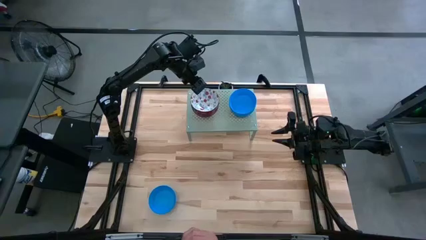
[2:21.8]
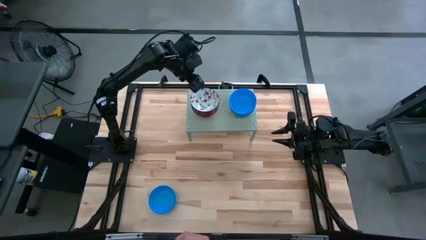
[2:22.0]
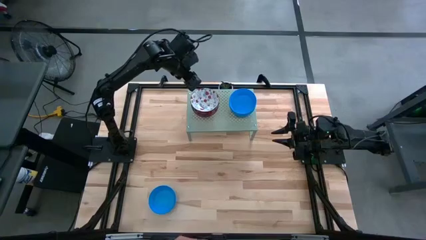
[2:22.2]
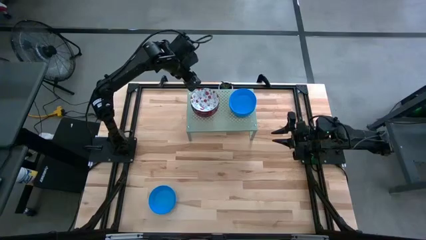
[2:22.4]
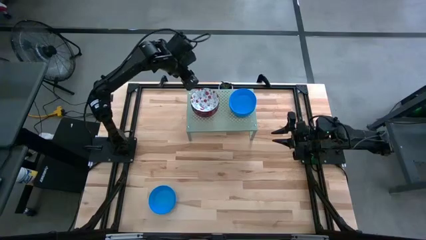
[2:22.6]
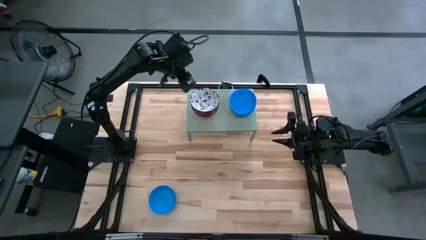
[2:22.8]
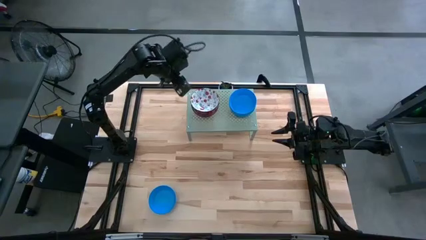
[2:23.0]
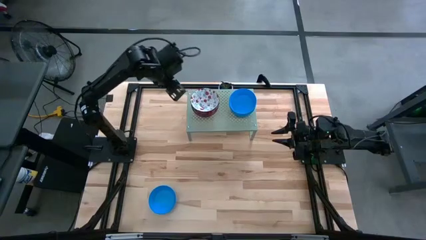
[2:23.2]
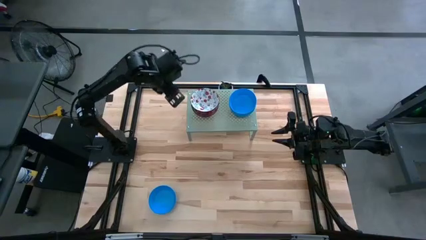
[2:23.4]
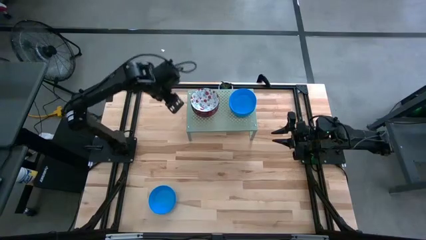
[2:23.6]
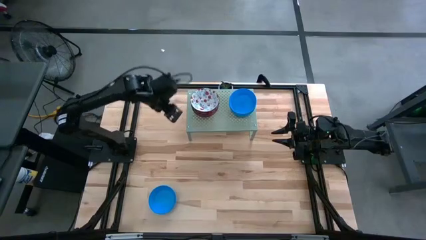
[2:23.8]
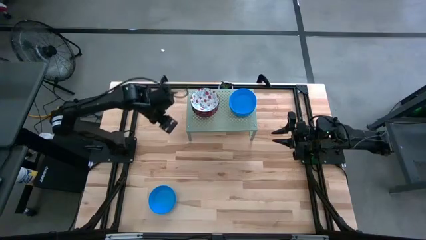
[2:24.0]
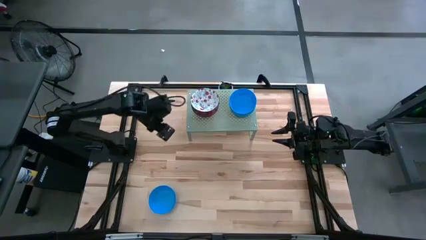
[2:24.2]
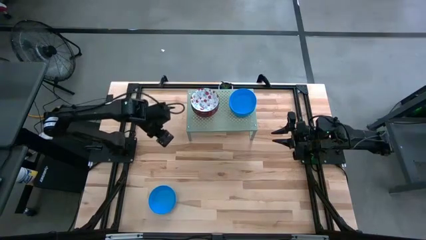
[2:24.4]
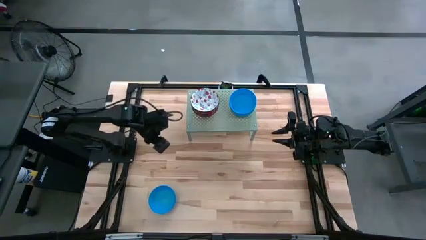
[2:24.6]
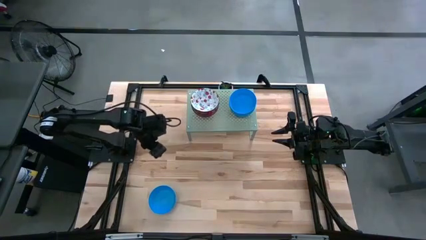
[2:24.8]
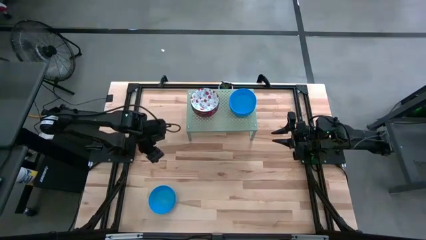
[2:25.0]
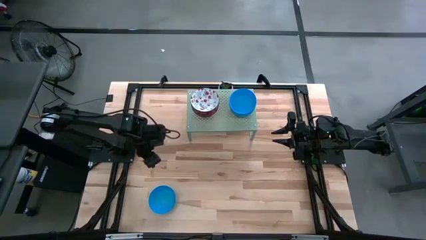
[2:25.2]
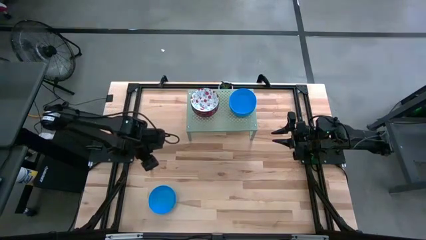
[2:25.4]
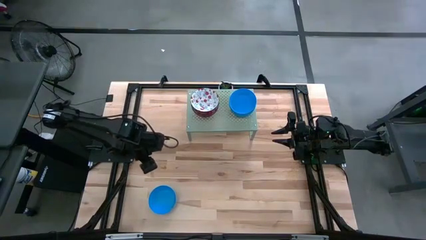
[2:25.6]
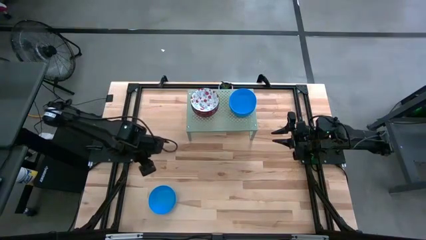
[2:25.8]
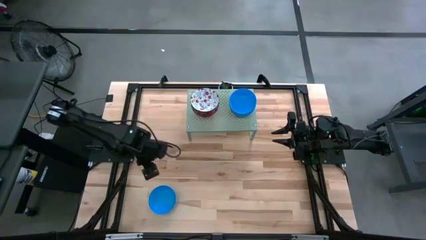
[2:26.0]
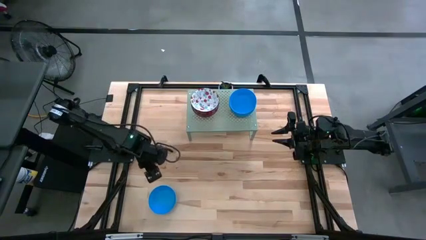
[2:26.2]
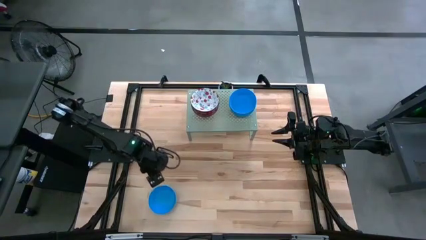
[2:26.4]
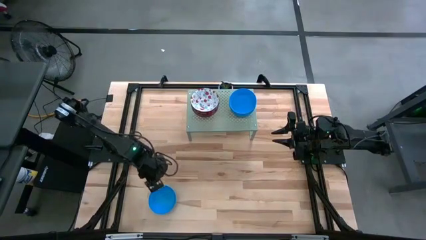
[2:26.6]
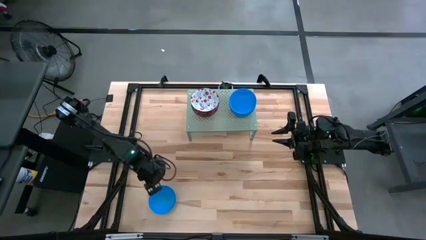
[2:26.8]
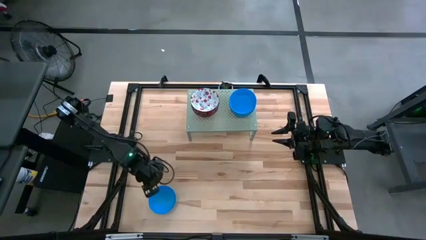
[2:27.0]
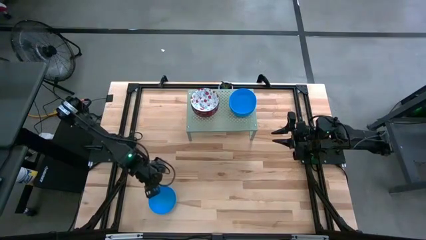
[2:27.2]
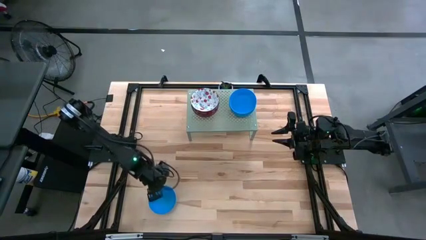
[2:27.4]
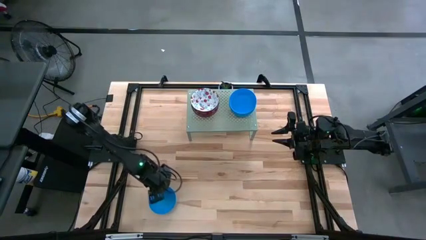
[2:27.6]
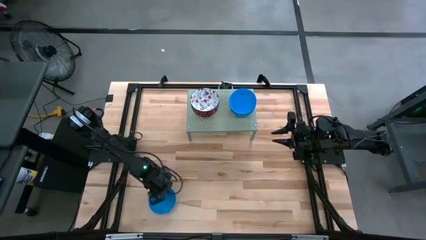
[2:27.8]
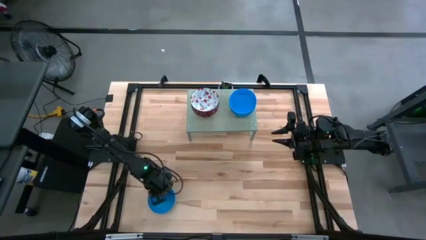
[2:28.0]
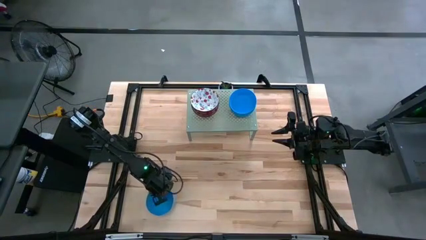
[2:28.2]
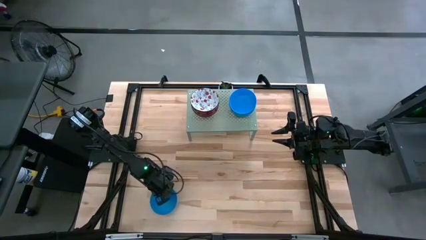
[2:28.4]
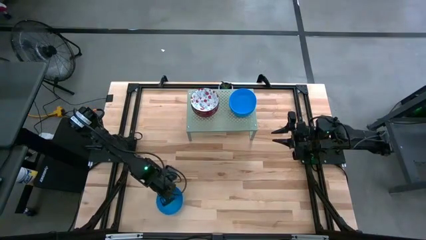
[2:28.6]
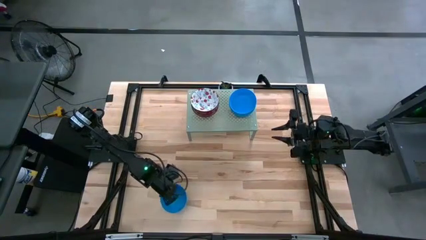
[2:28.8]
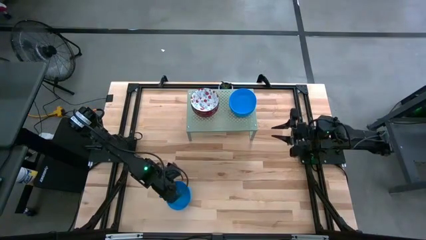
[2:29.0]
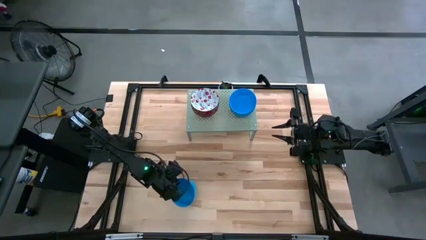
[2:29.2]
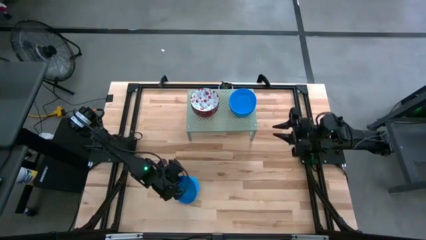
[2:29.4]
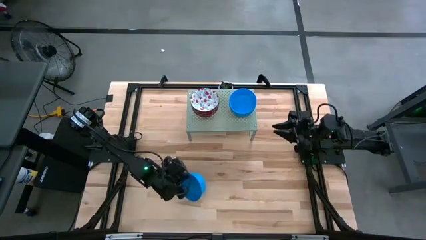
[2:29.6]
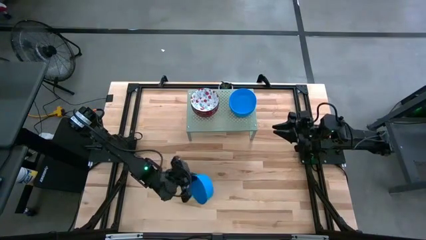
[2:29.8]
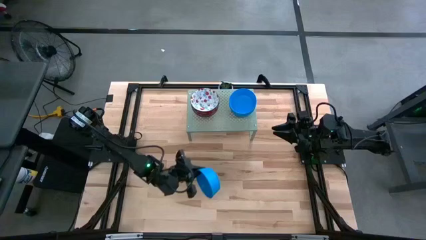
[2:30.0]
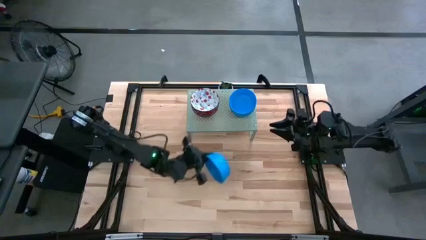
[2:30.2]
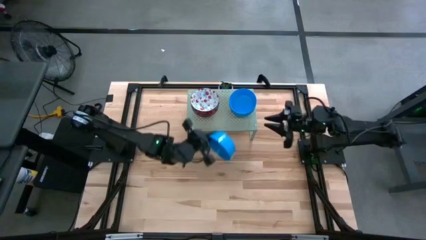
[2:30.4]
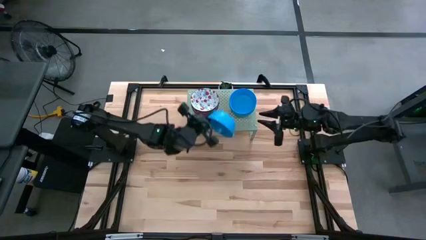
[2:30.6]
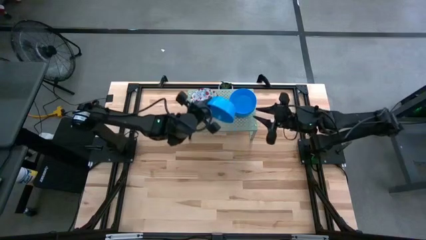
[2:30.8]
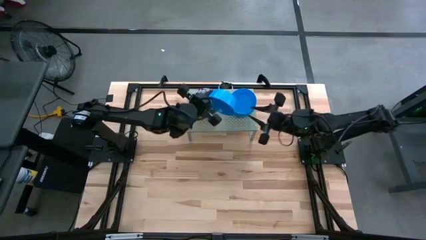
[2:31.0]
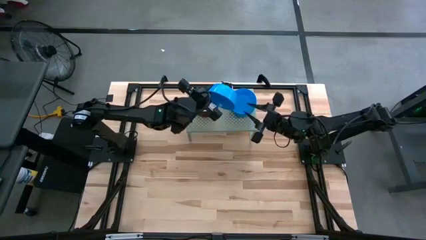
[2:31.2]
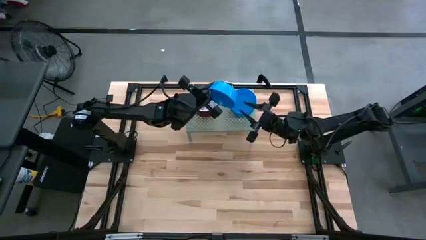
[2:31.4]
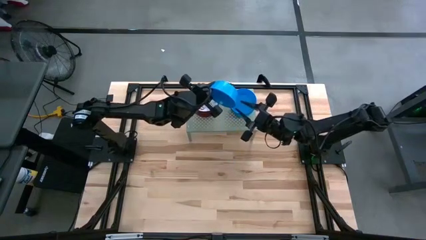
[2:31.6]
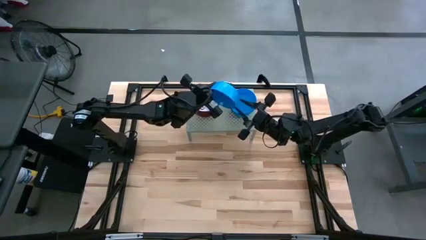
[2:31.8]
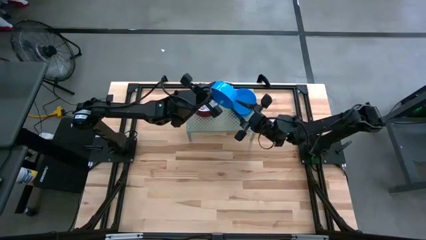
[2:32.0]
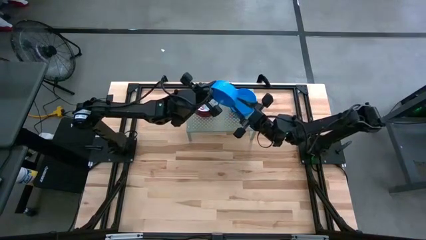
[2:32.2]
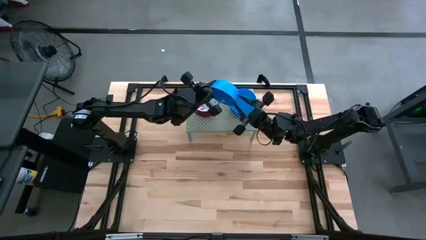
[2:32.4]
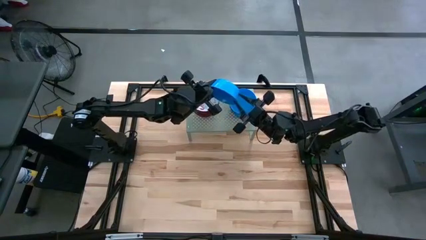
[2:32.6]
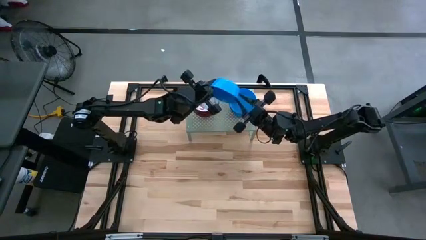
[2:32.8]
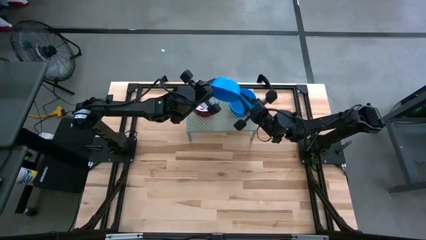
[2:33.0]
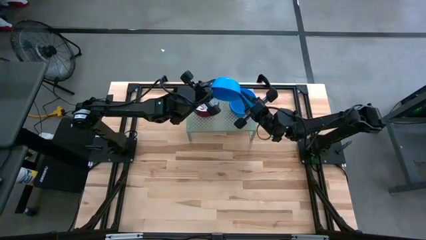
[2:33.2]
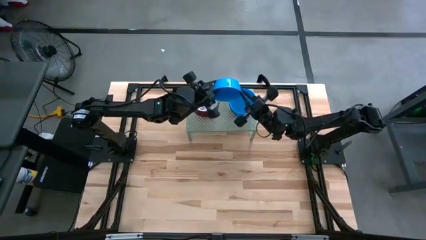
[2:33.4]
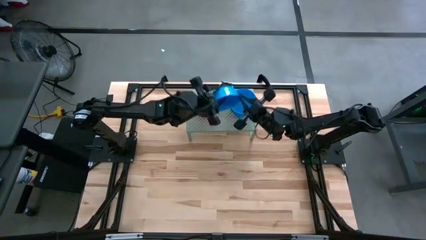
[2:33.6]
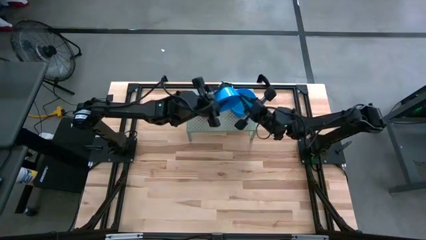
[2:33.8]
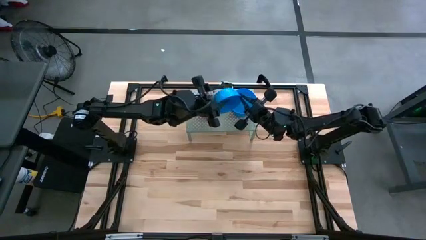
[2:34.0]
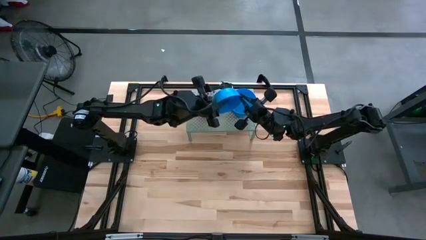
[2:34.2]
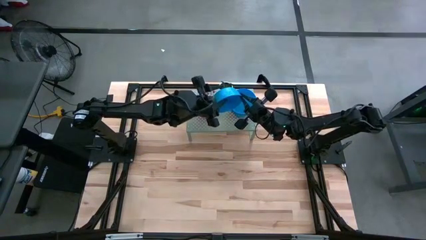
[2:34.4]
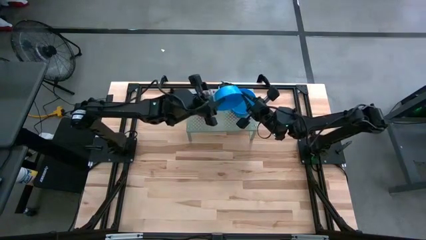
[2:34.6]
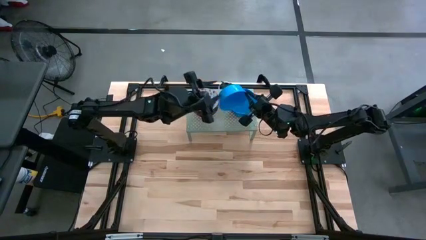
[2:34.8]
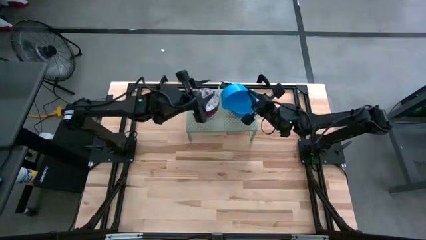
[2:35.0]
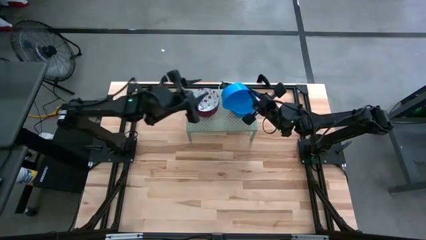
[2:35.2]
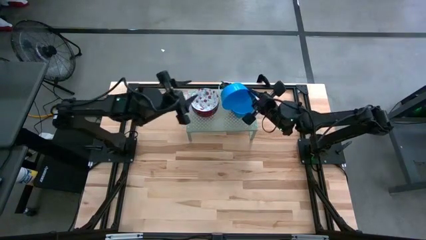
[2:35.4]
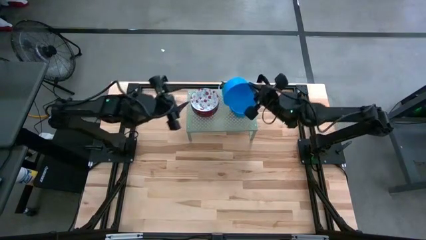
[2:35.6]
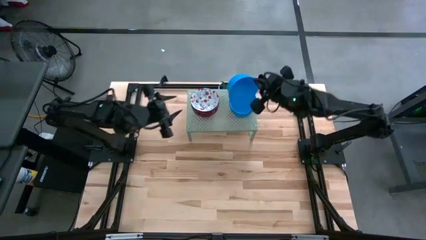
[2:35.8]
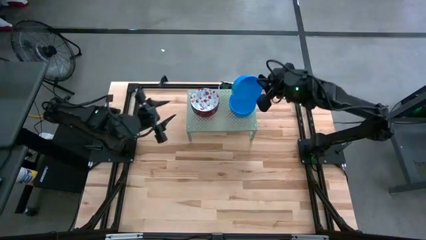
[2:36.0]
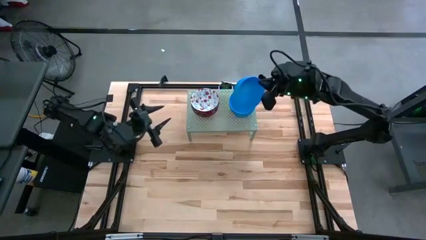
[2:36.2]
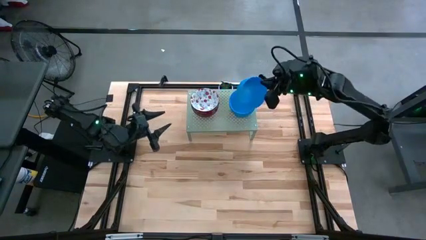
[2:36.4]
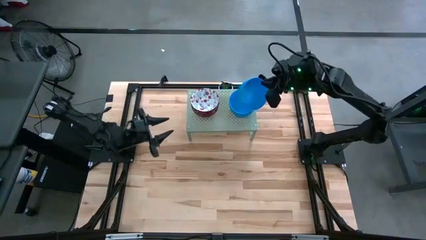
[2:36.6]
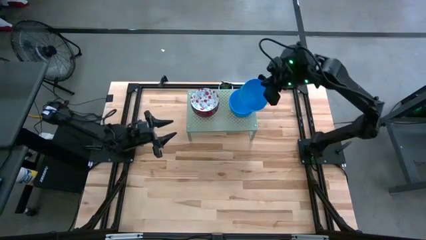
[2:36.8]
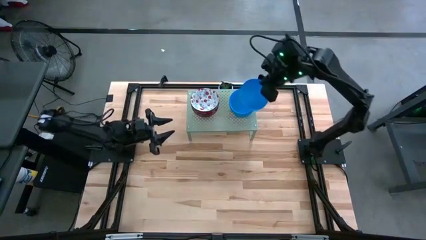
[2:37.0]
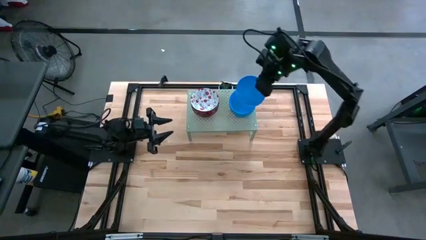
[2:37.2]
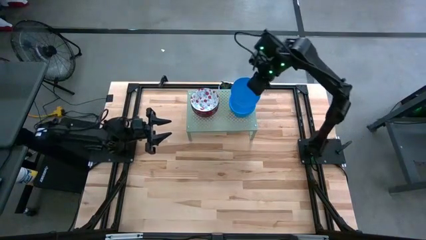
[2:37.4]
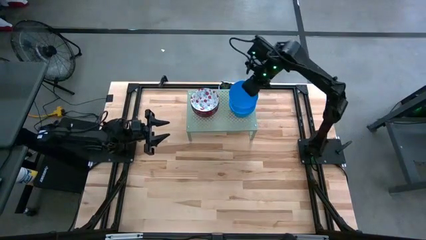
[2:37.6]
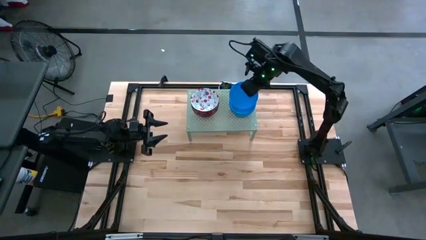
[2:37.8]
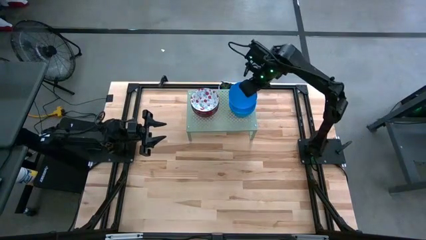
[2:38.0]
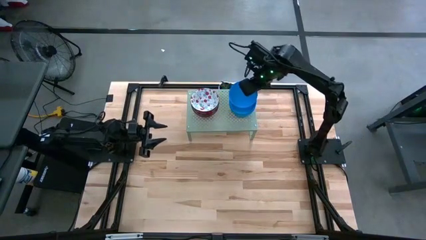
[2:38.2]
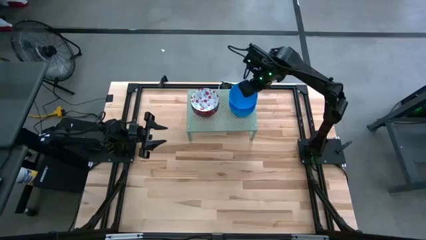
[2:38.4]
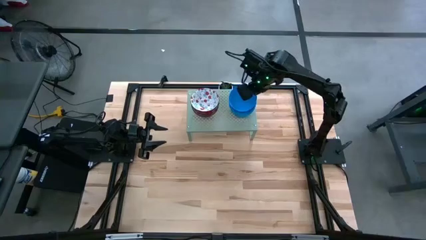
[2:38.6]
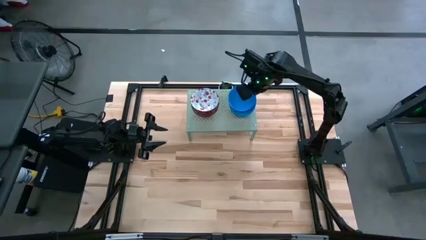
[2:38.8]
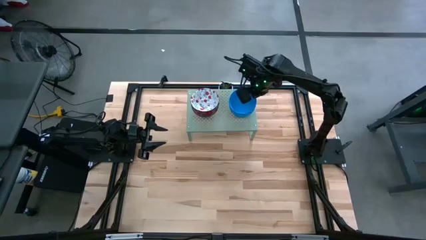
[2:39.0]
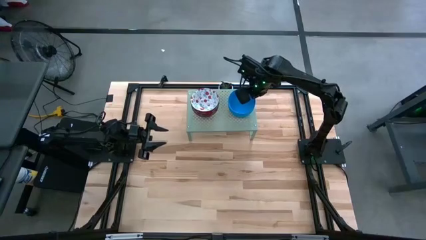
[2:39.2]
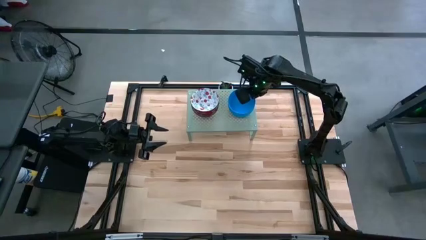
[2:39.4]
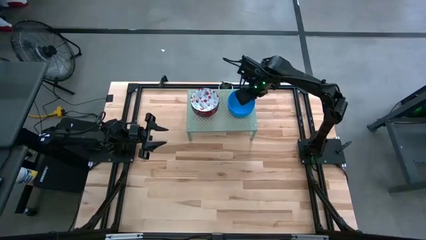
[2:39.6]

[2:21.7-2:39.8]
Task: Pick & Place Mini bowls
Stack the blue bowl on the blue bowl on the shelf
